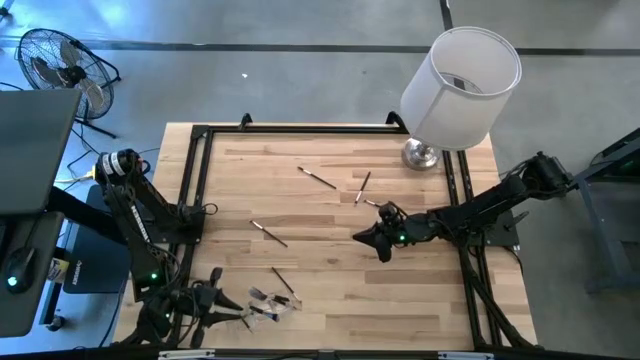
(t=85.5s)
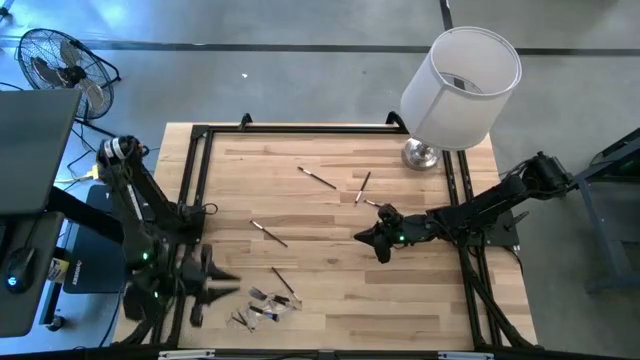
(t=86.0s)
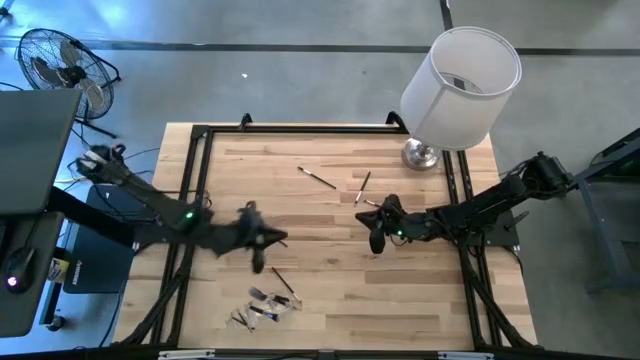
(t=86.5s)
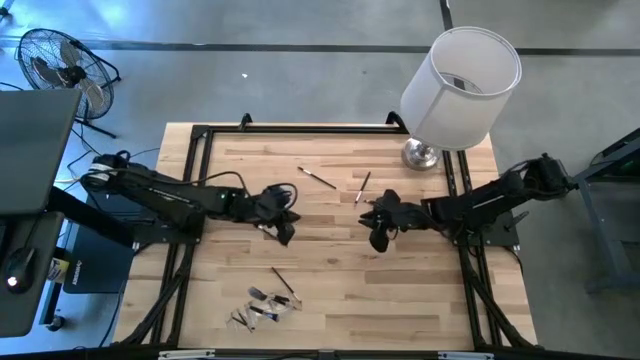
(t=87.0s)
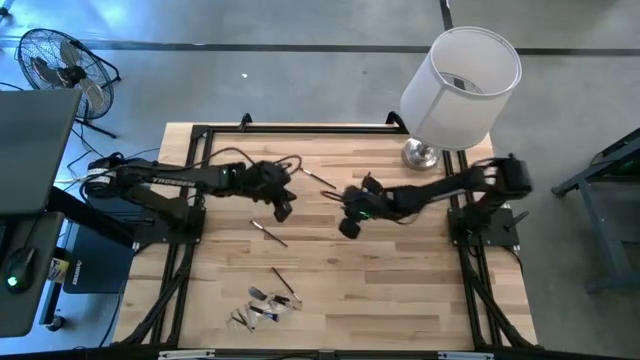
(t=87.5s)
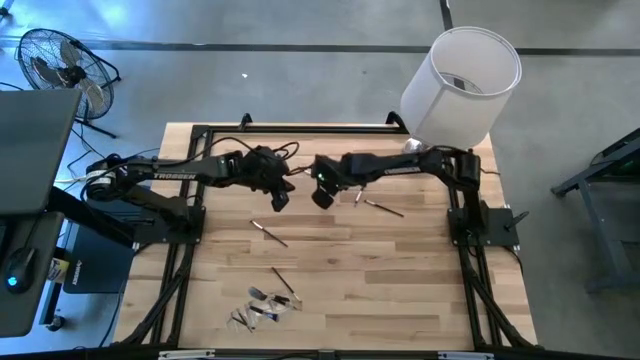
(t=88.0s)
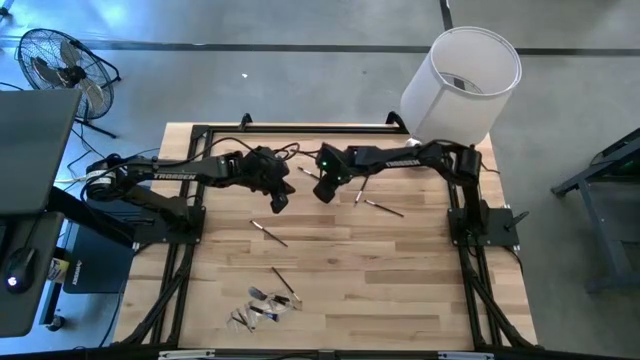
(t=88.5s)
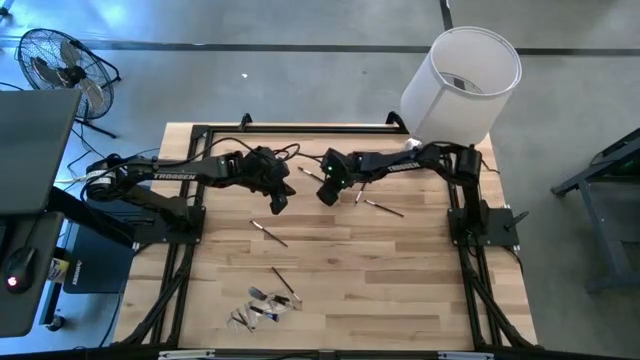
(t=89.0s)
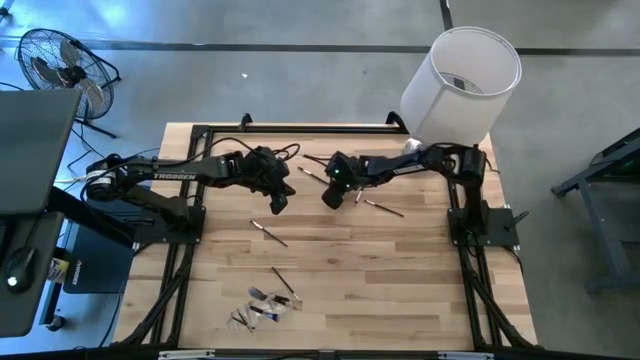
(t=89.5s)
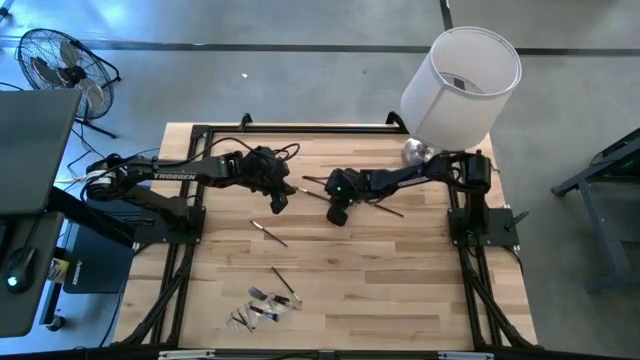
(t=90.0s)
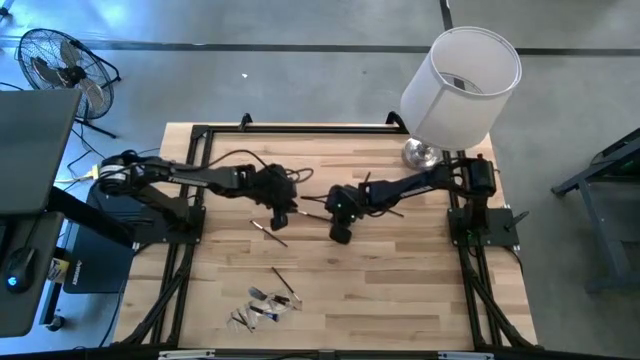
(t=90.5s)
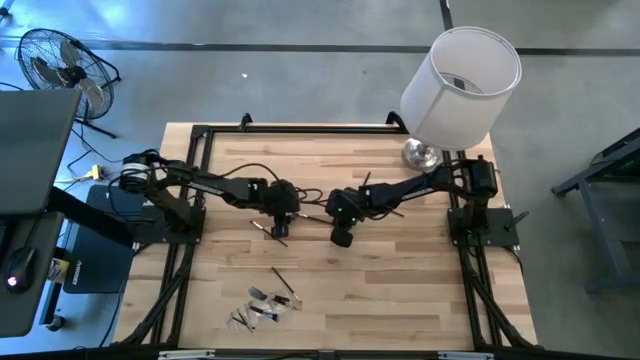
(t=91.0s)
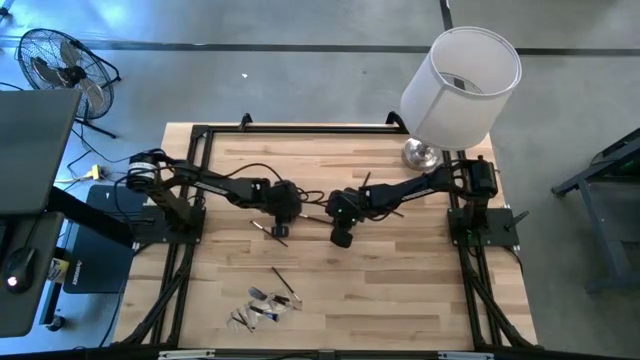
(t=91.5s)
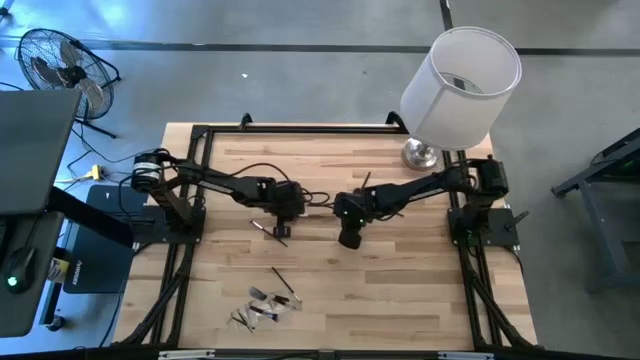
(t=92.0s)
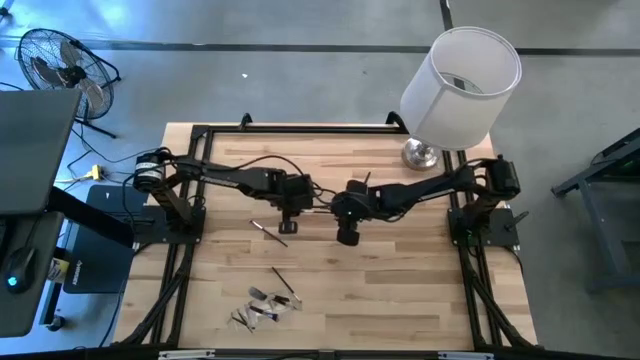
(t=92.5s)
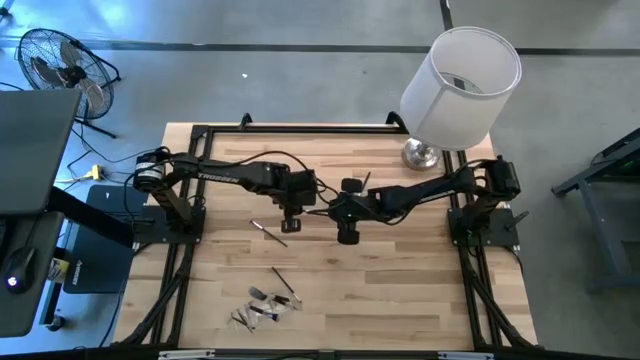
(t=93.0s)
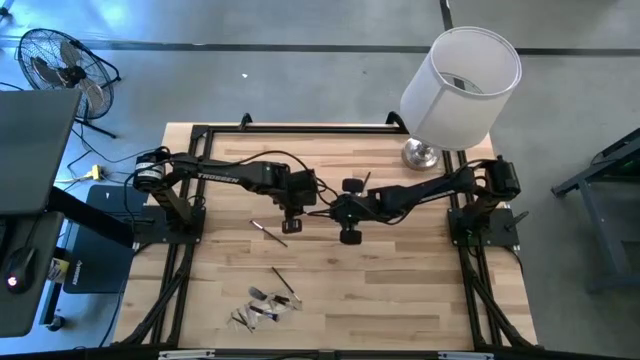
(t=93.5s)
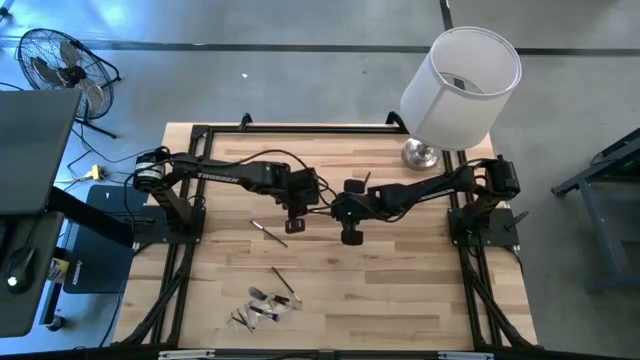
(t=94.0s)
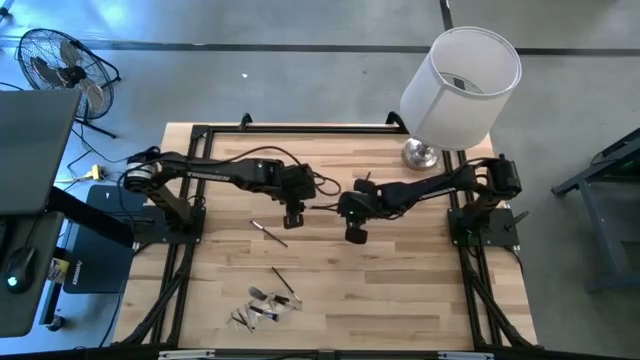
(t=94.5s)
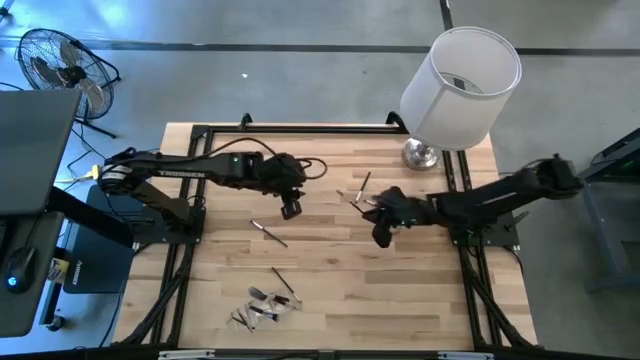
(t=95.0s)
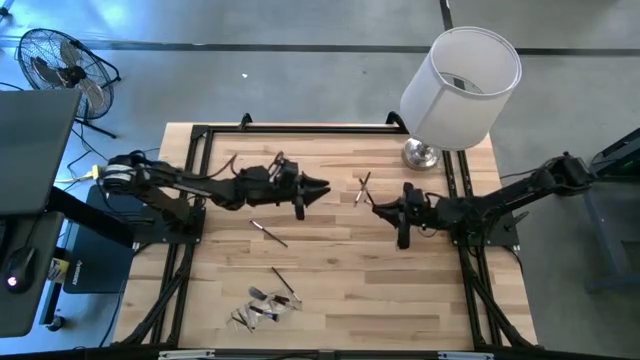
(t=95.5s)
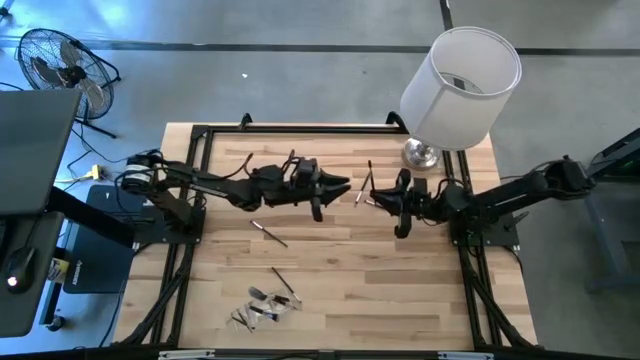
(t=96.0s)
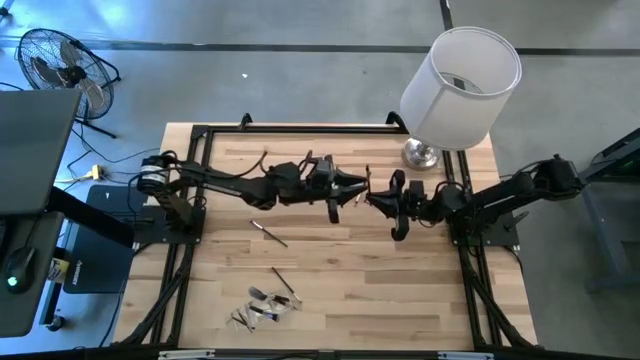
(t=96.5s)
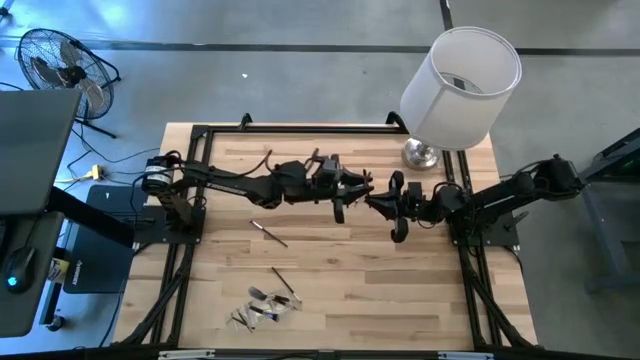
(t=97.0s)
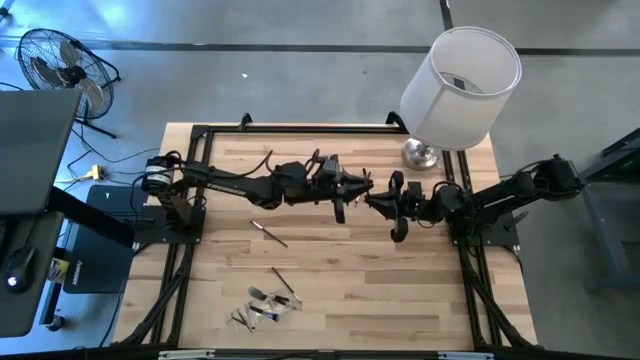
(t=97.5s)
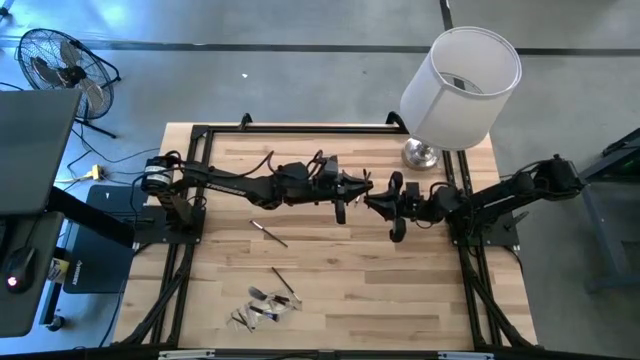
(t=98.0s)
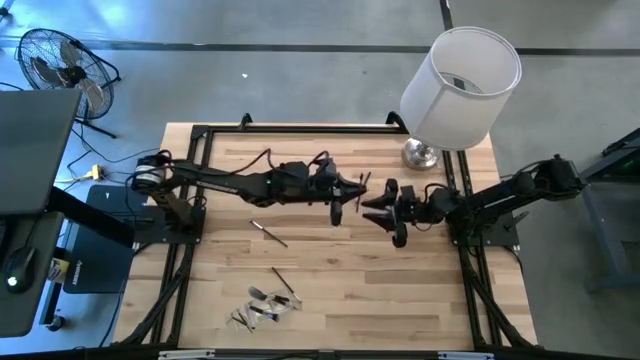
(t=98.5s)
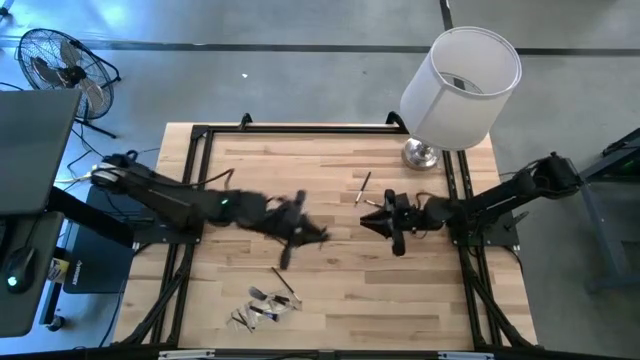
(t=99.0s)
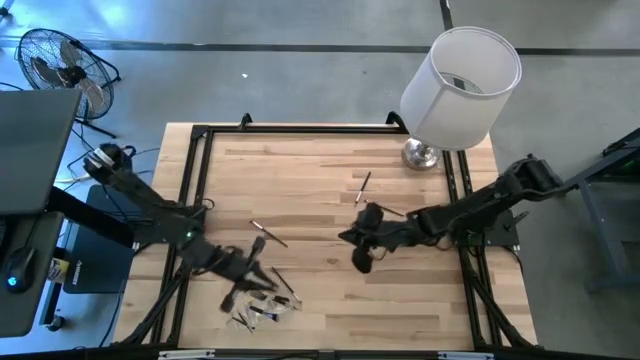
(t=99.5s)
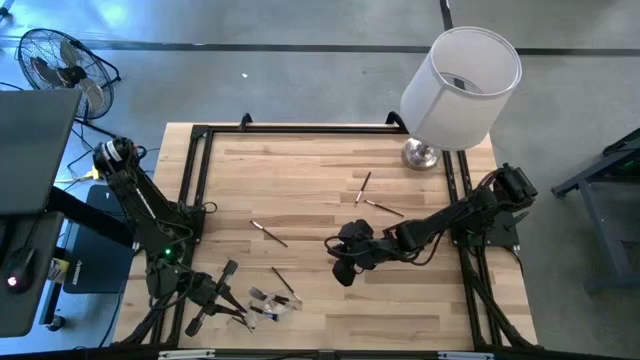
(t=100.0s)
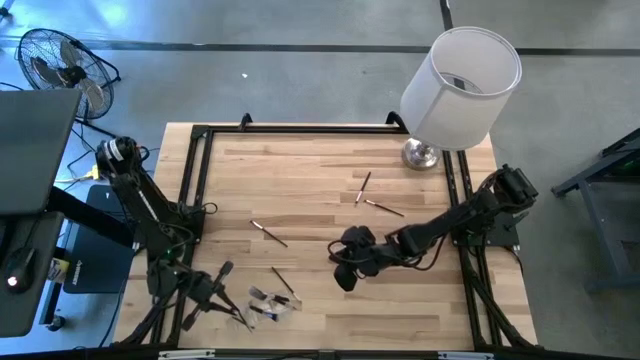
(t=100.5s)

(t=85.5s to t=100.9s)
Task: Pick & Place Makeup Supplies
Put the silver makeup brush into the transparent organizer

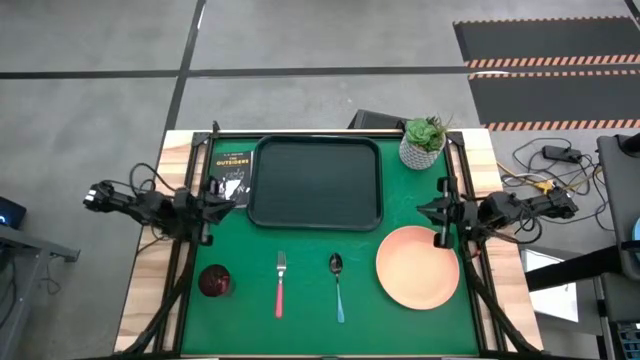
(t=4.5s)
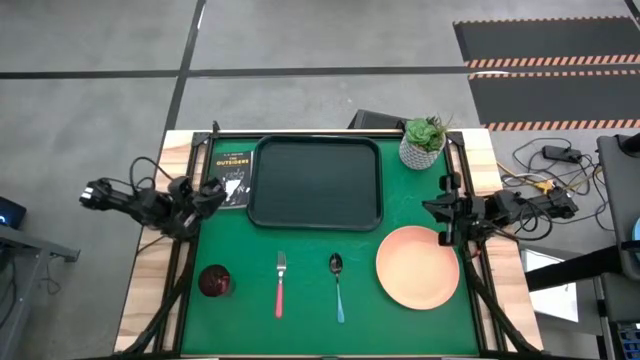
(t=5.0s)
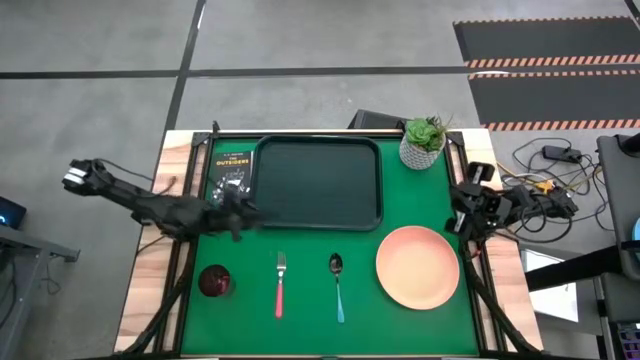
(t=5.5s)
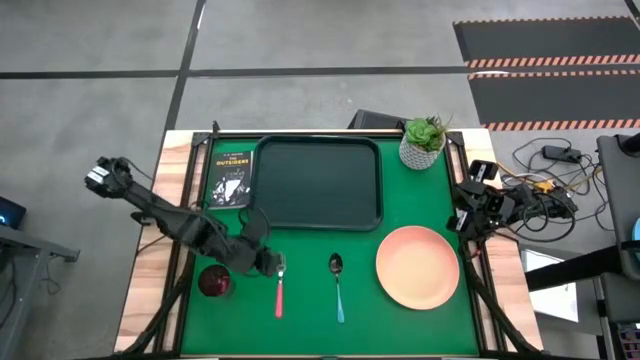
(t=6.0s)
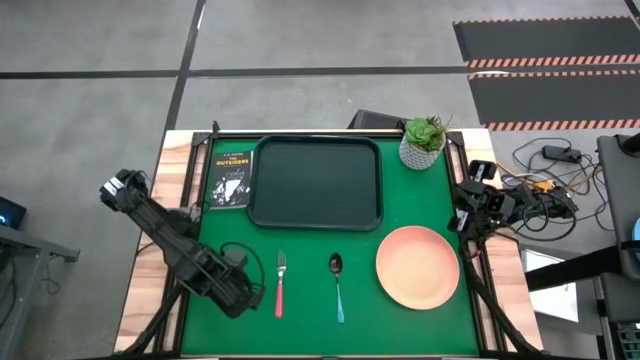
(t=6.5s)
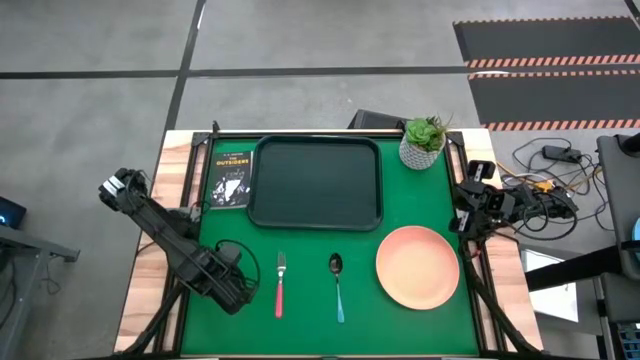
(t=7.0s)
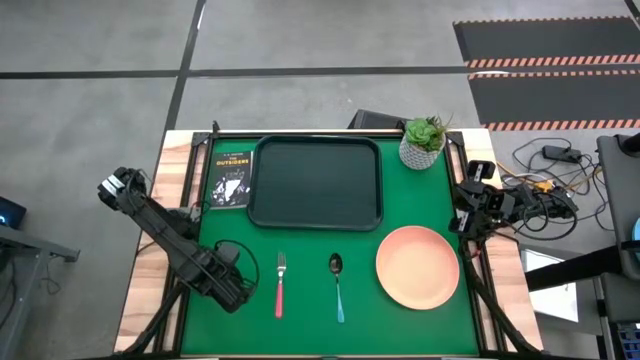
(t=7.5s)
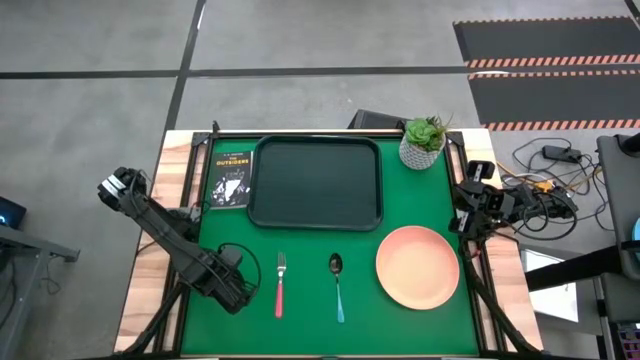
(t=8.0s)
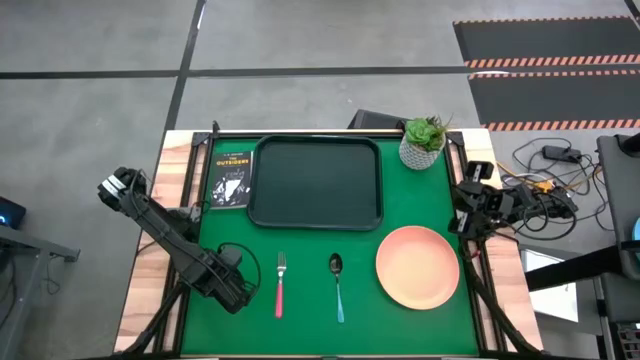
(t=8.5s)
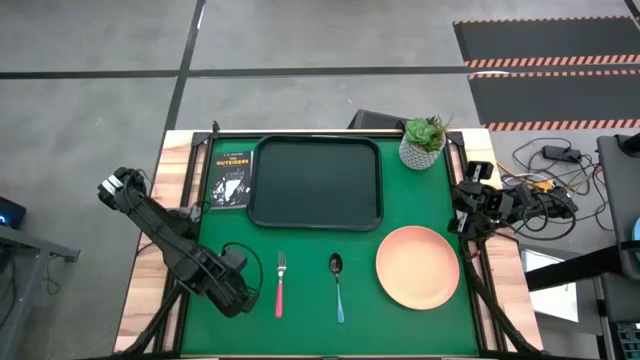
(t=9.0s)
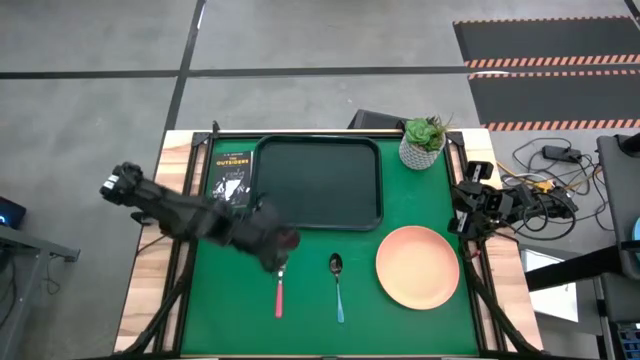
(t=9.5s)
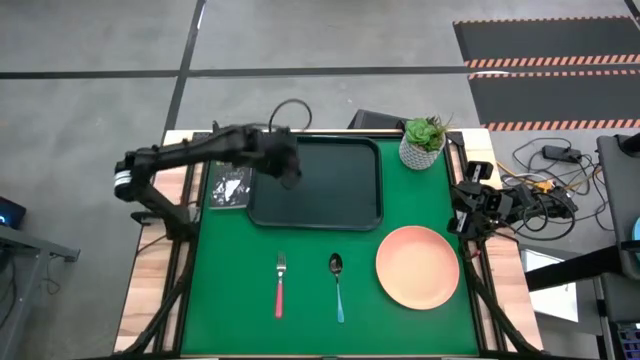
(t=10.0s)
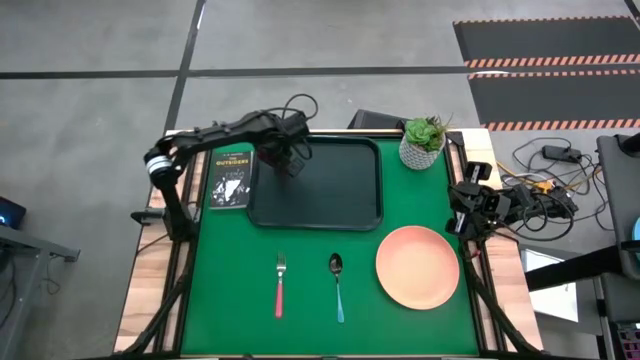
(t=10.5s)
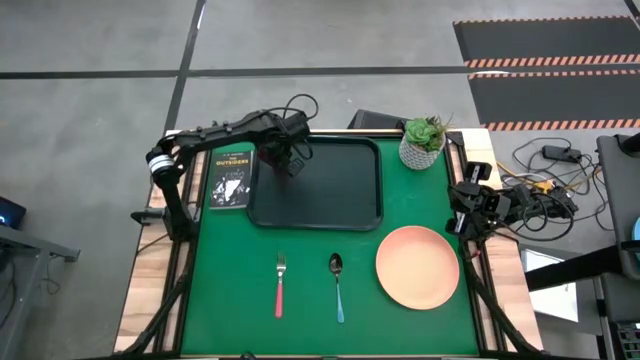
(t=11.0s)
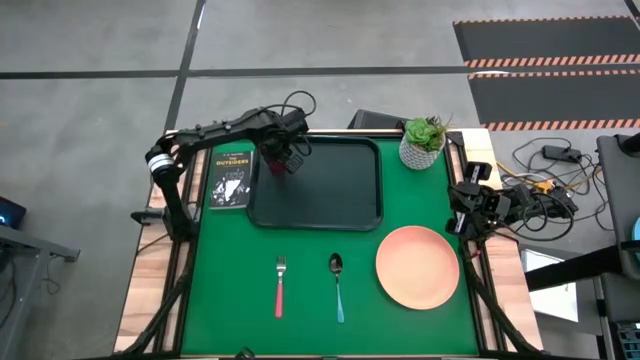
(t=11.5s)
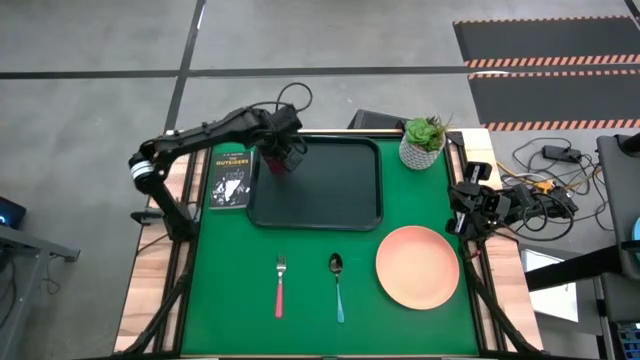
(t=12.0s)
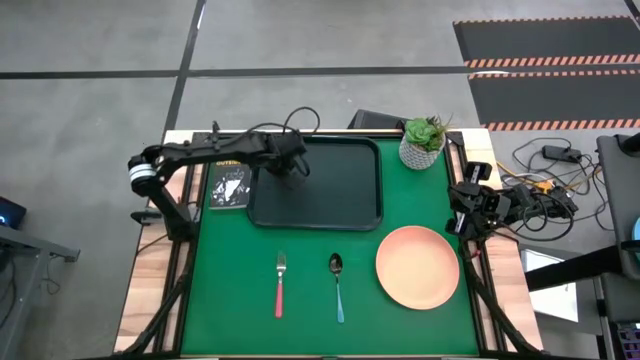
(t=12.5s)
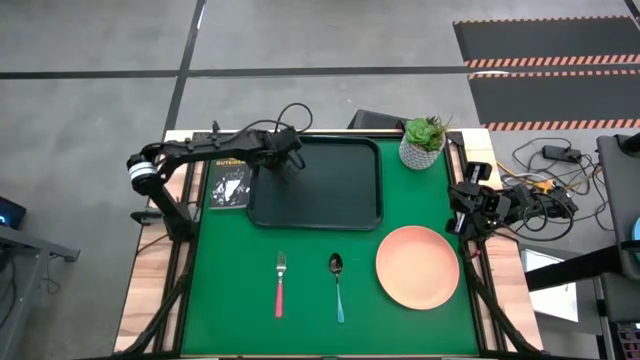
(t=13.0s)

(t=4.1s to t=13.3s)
Task: Pick and place plate/cup/fork/spoon on tray
Put the red cup on the black tray
